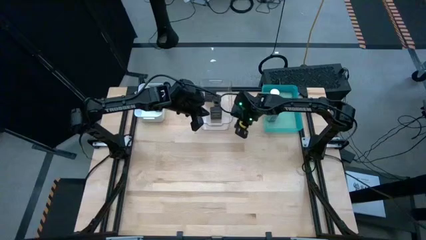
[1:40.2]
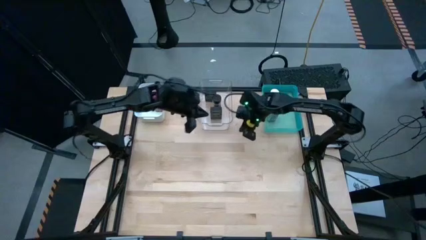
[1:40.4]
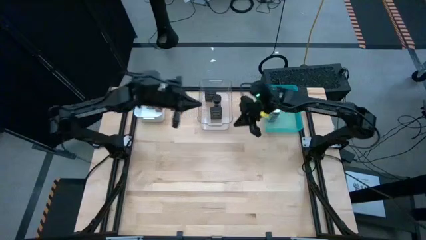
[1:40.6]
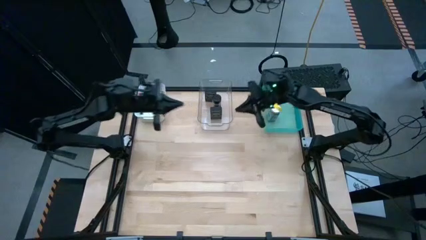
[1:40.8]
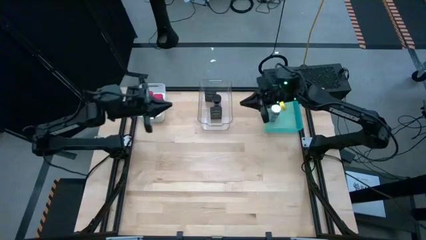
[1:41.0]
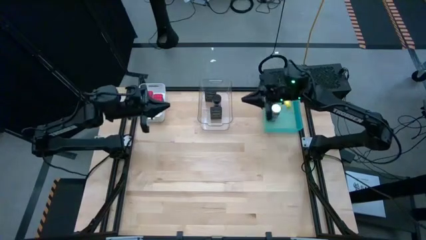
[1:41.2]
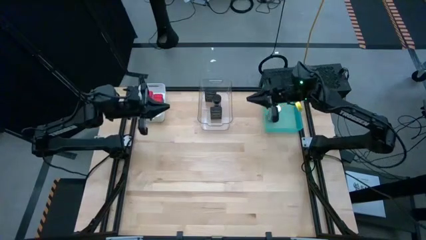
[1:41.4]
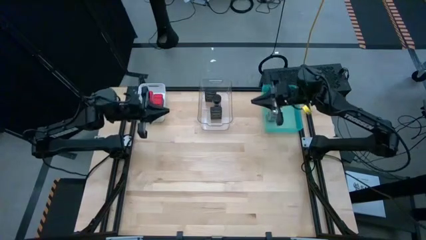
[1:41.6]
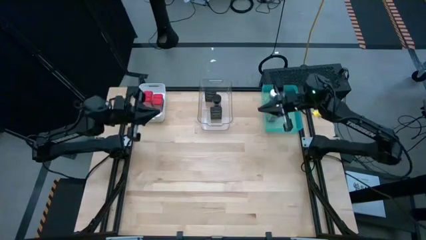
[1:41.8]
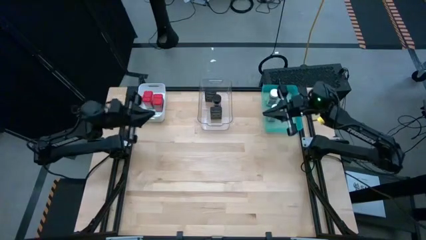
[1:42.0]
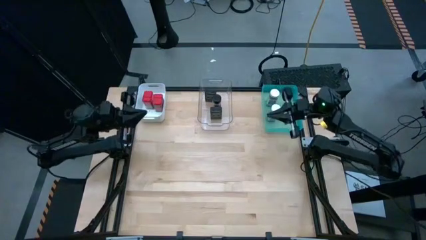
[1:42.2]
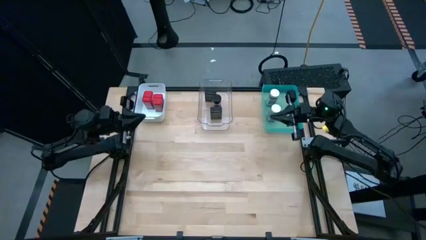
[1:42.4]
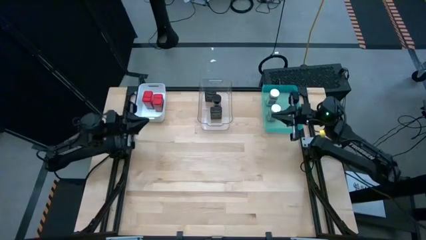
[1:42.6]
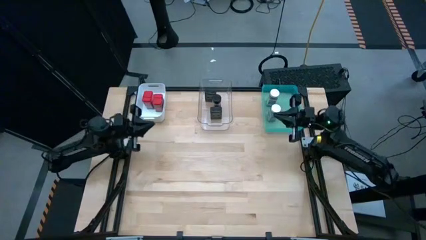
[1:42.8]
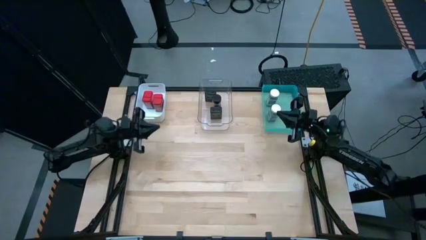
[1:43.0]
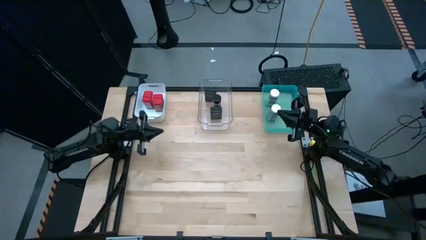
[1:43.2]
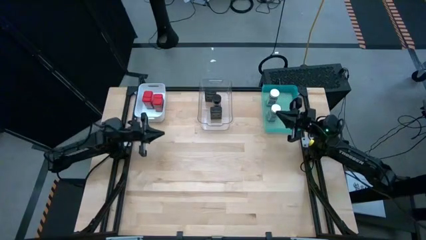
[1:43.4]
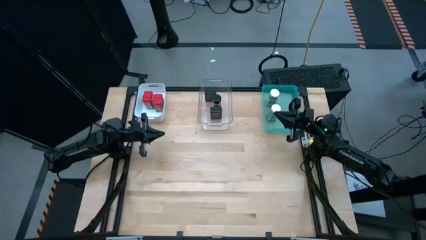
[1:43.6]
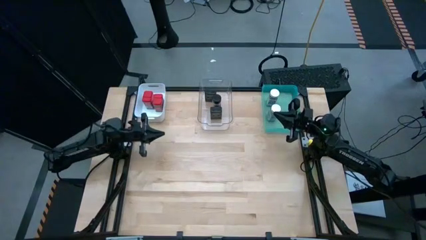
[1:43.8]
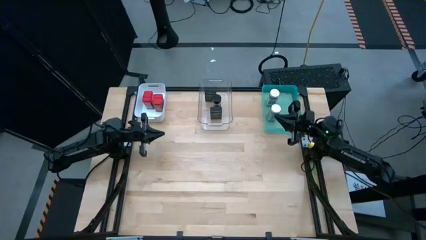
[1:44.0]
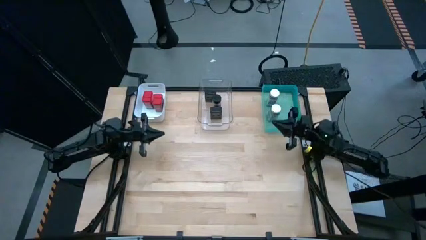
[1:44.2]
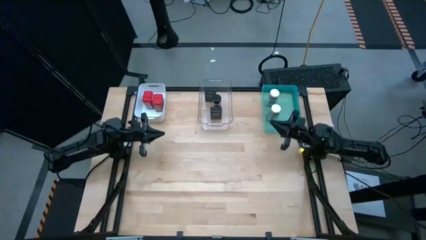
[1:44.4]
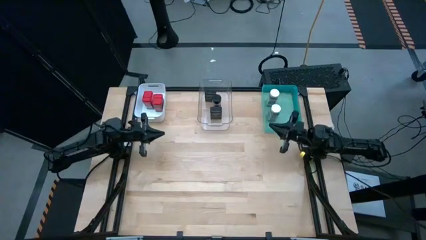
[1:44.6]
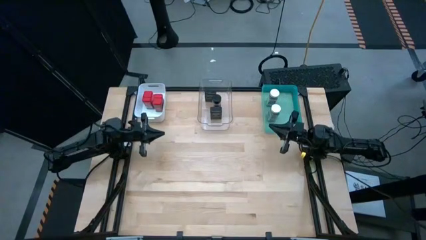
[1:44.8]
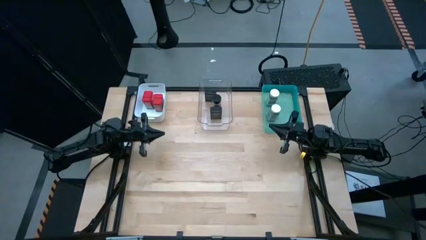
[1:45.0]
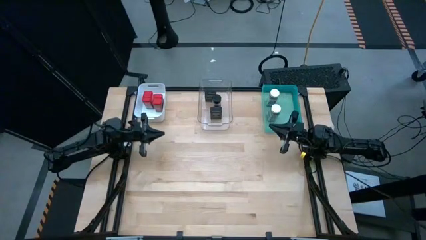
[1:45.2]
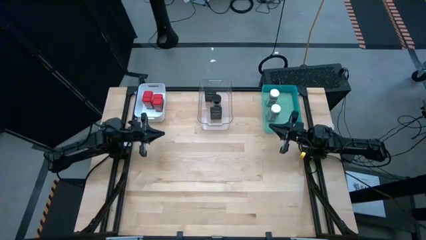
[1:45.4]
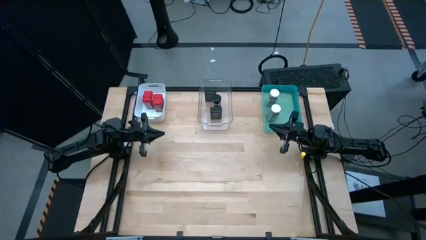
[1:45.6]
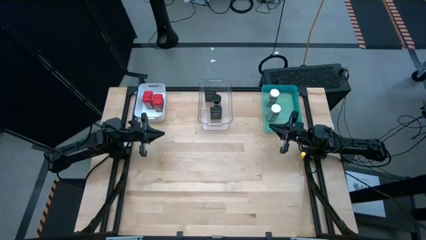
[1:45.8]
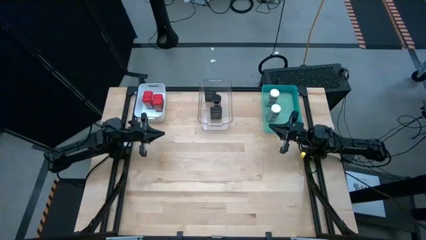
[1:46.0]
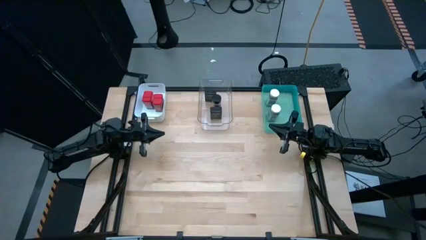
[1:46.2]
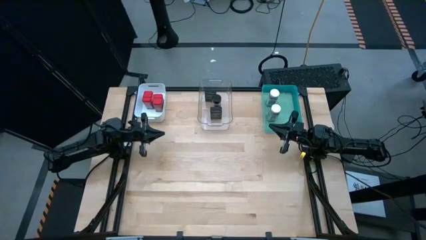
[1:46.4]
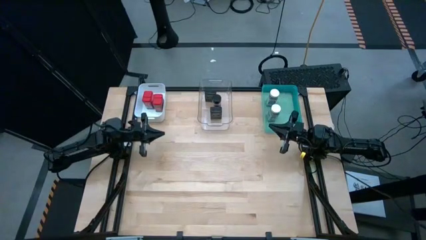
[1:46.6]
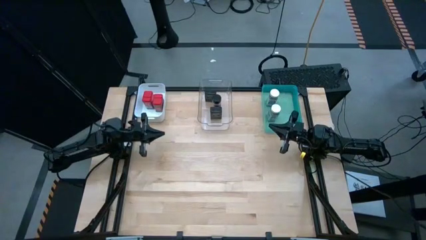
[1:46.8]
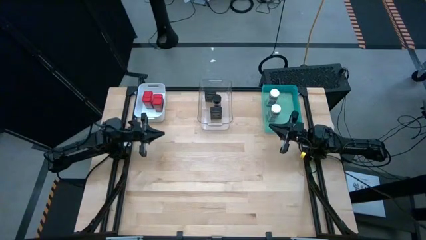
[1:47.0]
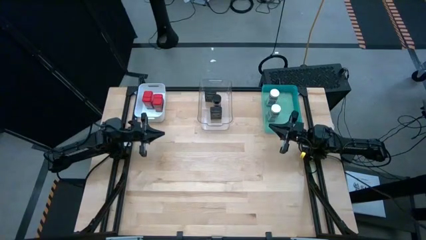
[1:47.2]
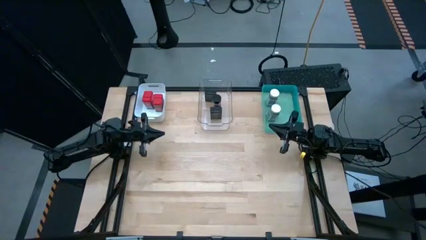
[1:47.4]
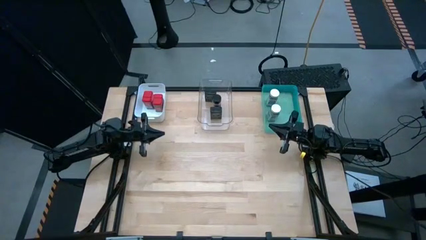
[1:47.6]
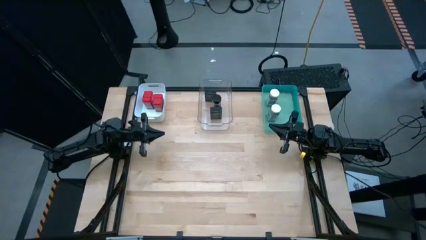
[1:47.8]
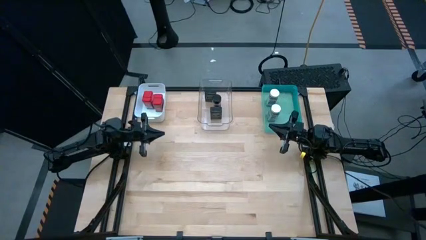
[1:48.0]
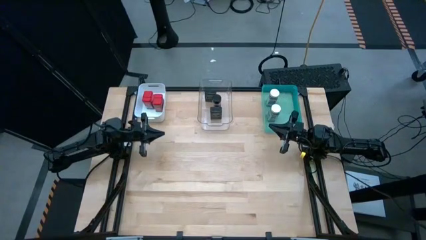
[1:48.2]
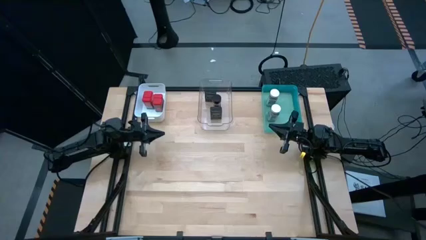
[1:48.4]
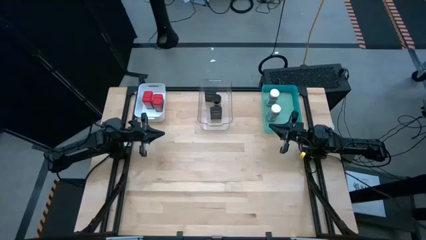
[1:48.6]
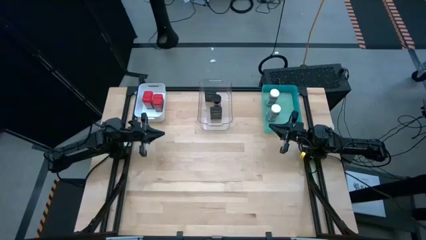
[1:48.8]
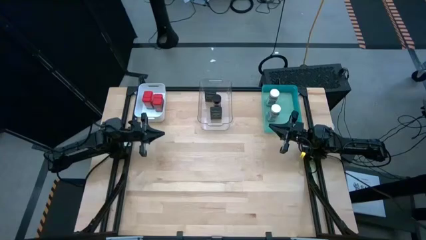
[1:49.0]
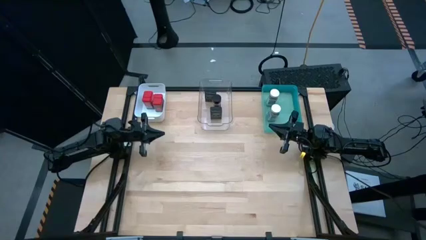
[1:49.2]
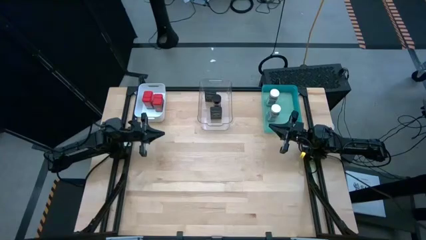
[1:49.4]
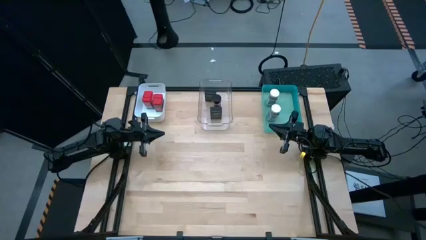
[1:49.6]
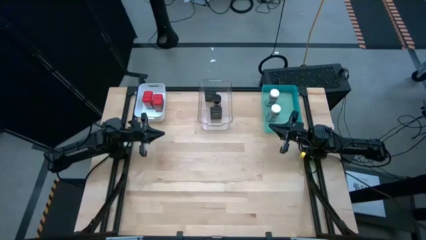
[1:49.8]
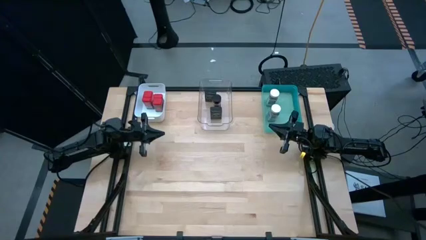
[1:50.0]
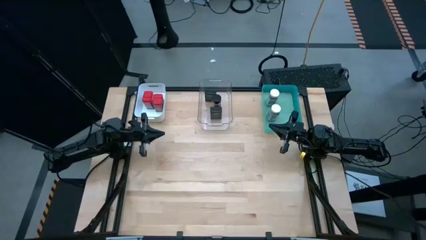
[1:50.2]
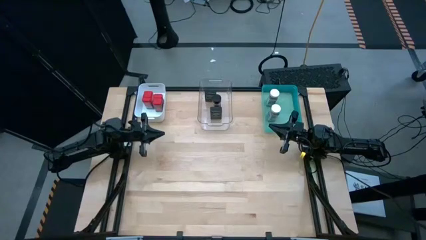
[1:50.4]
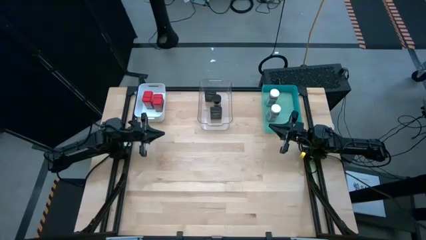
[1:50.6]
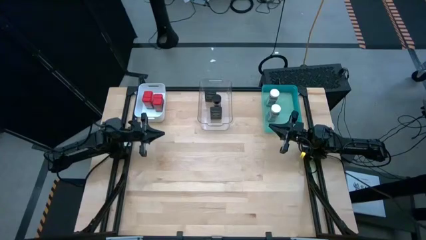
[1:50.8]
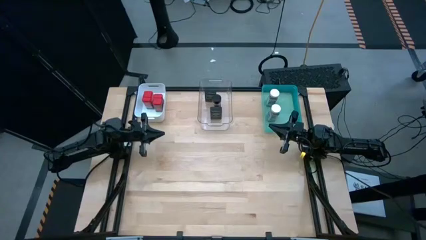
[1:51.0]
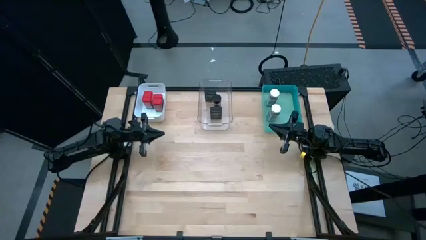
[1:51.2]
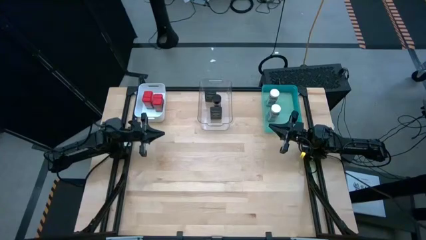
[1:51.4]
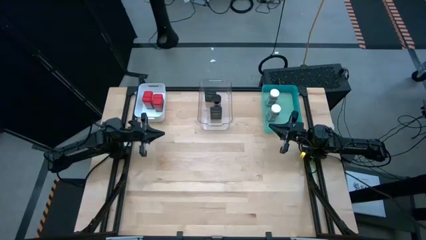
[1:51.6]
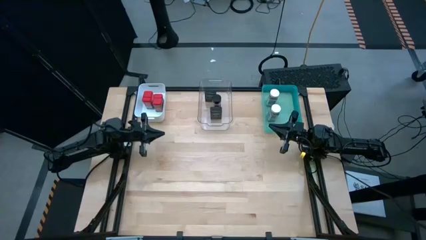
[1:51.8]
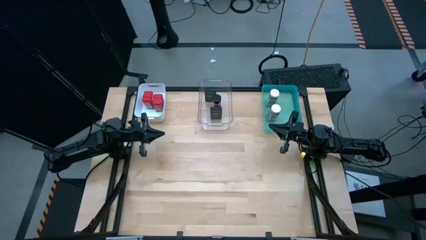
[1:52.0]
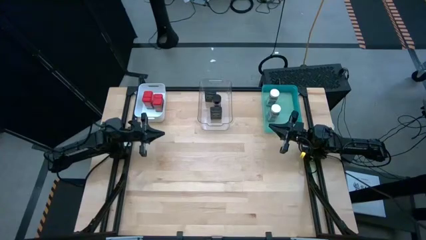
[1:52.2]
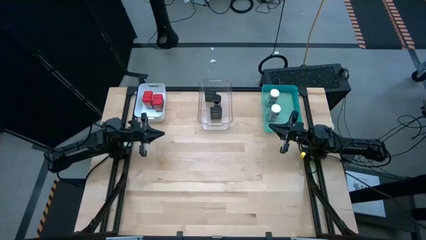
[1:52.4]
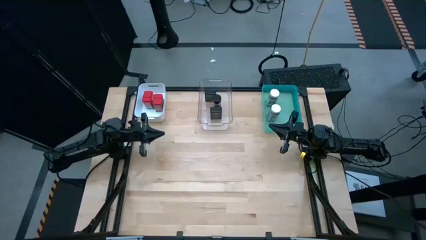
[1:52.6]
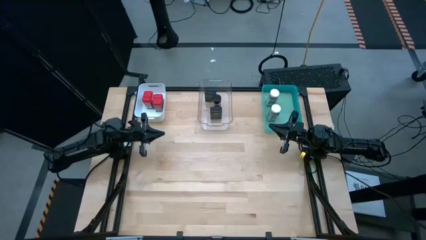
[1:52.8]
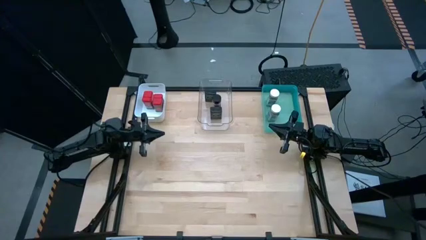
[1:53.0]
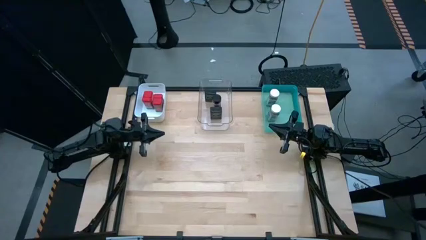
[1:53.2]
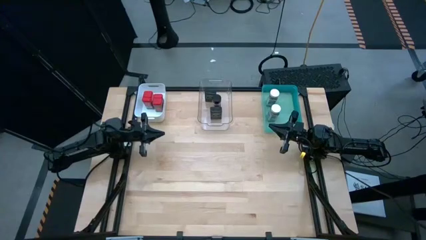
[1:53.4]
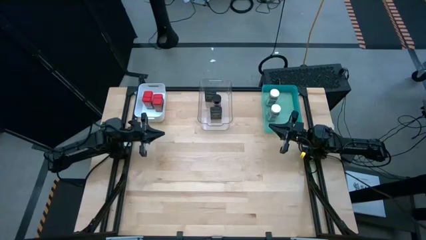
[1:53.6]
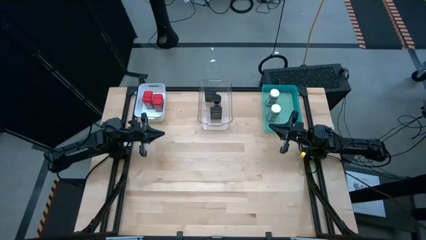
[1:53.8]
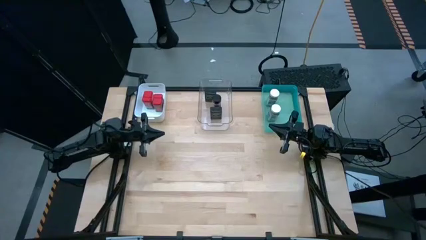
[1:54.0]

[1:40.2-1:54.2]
Task: Sort spices by type
Return to Home Position

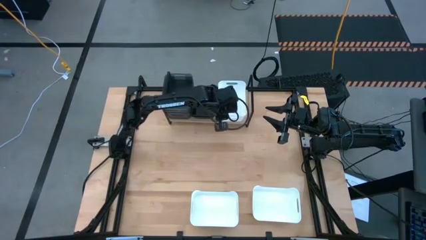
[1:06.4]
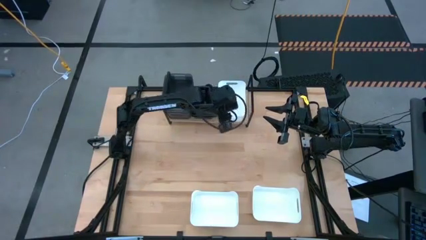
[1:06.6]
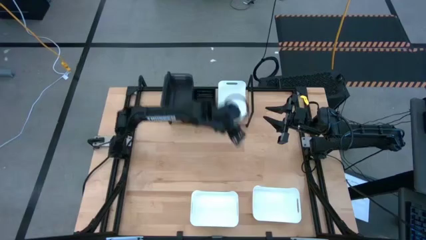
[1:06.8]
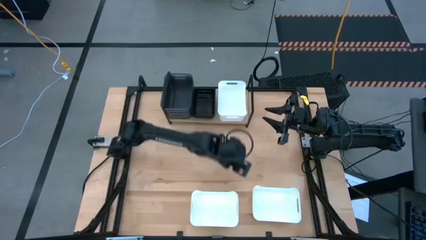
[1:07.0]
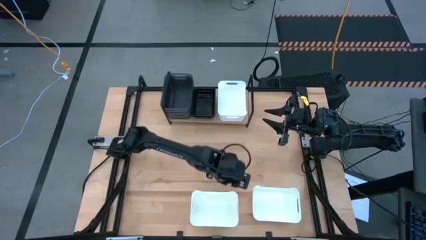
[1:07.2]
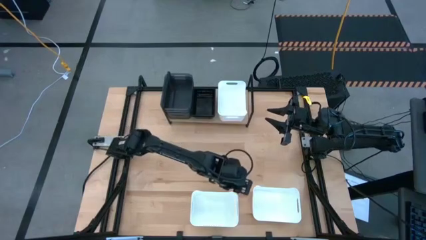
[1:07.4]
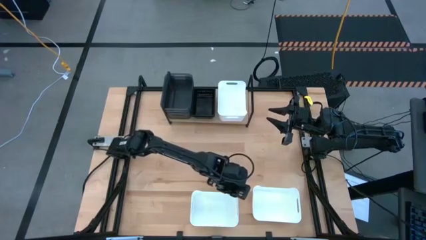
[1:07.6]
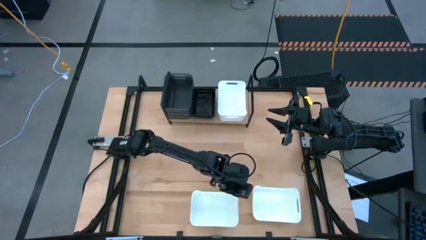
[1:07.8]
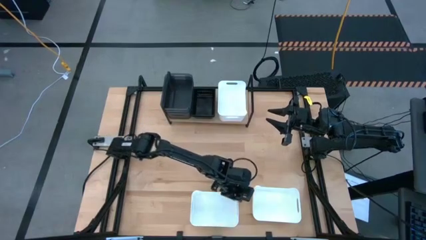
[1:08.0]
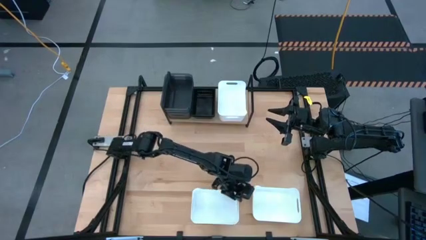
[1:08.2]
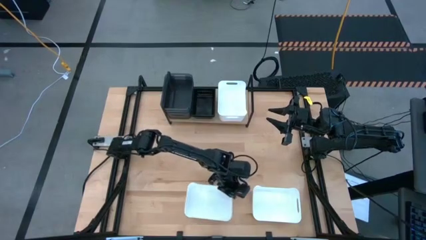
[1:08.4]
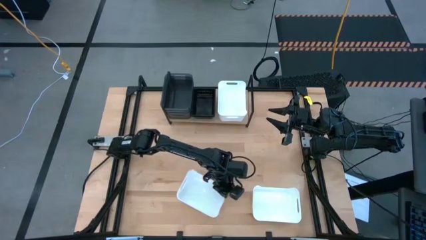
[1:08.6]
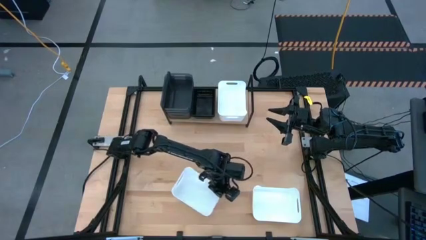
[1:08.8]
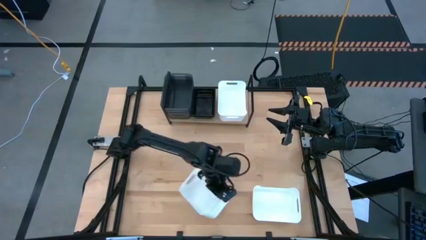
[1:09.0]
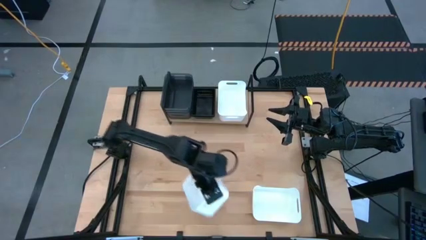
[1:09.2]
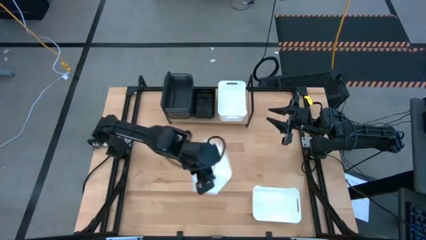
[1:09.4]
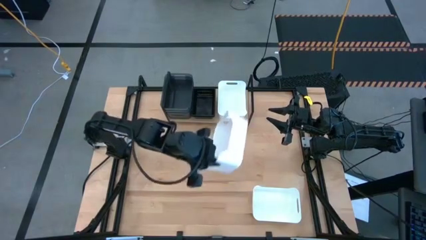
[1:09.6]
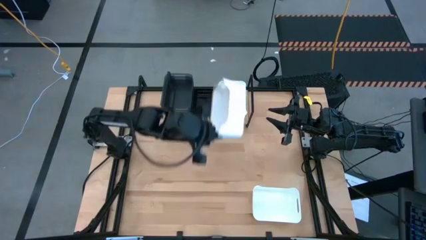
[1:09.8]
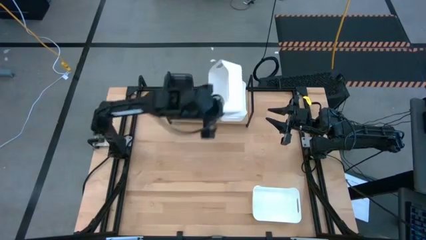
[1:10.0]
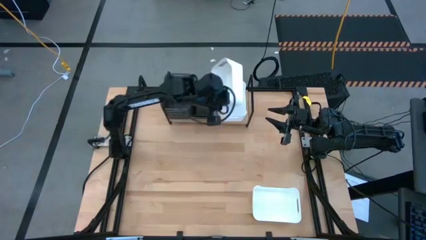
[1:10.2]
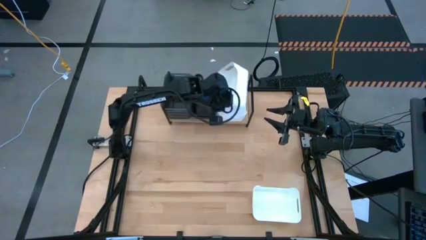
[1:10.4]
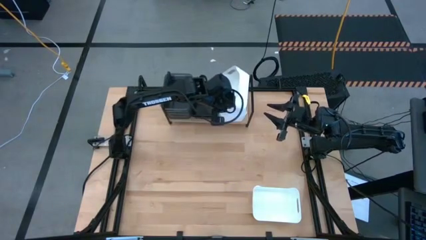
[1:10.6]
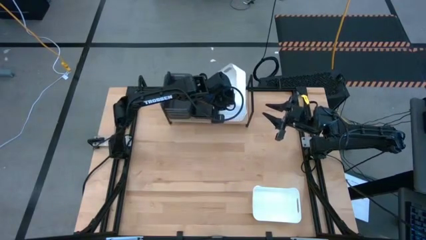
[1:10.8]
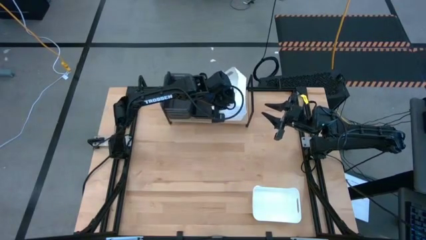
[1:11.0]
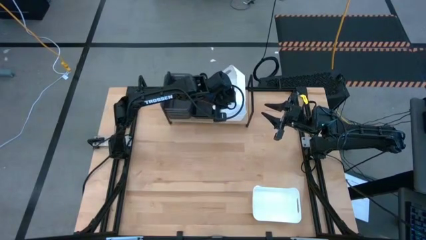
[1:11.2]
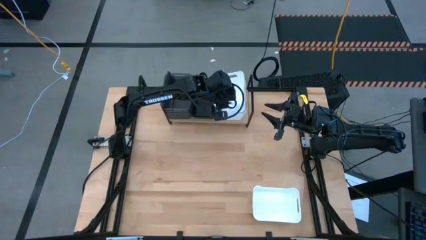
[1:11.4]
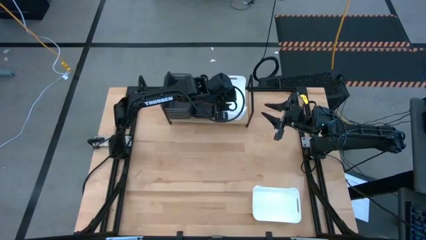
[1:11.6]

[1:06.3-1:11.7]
Task: Stack baskets on shelf by color
Stack the left white bin on top of the white bin
